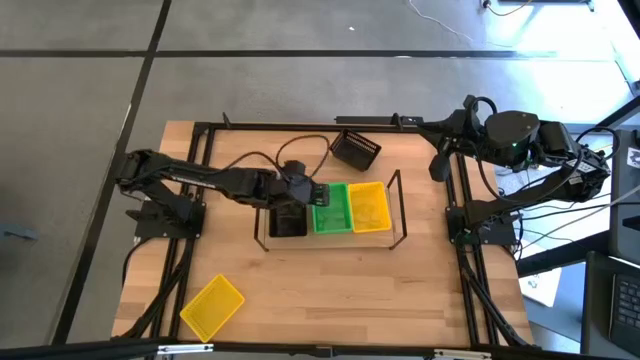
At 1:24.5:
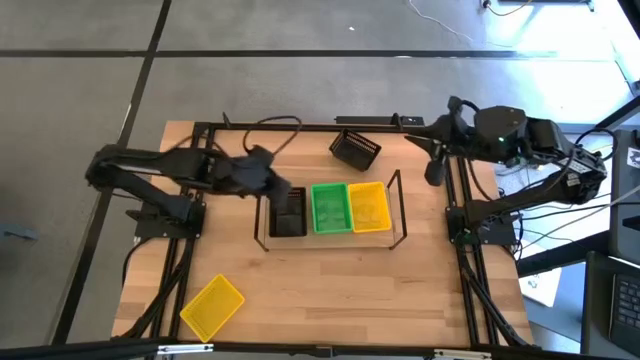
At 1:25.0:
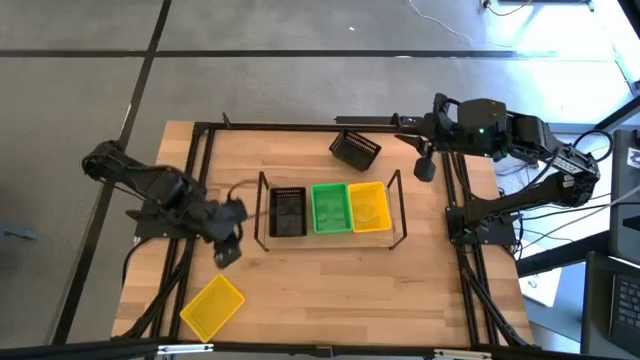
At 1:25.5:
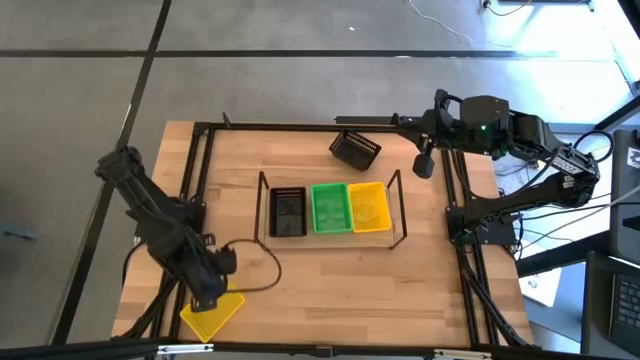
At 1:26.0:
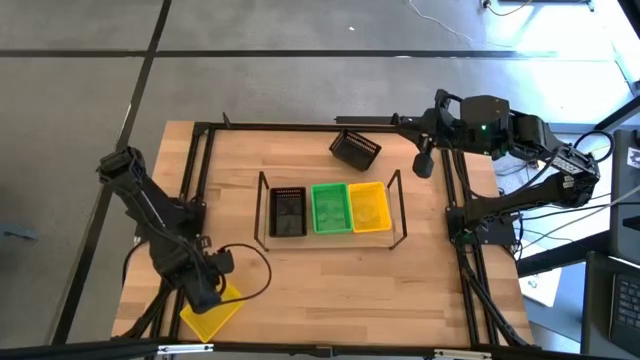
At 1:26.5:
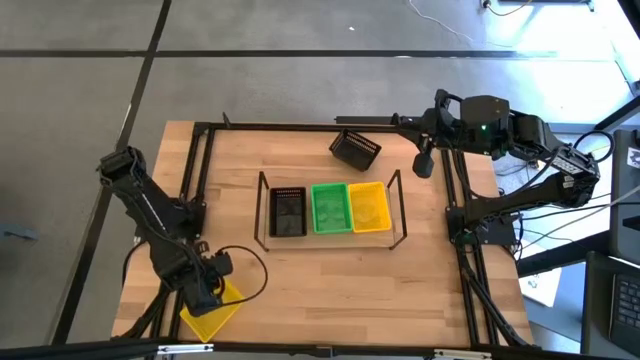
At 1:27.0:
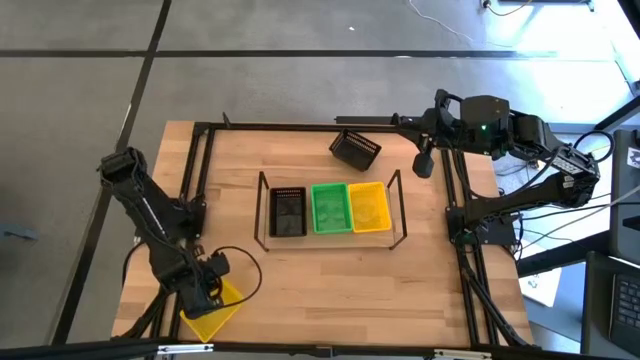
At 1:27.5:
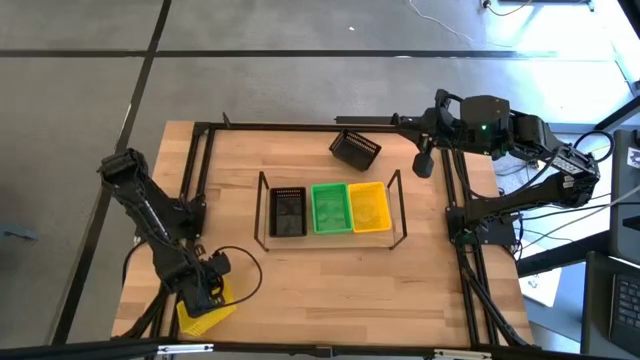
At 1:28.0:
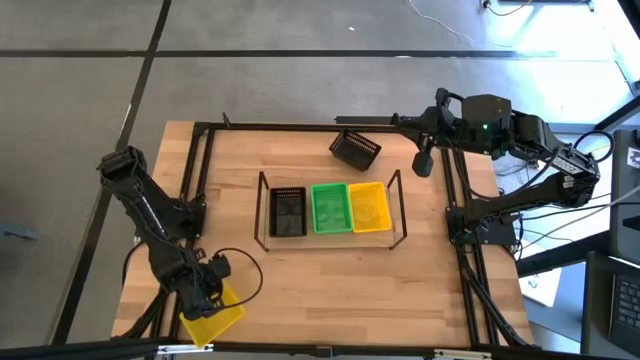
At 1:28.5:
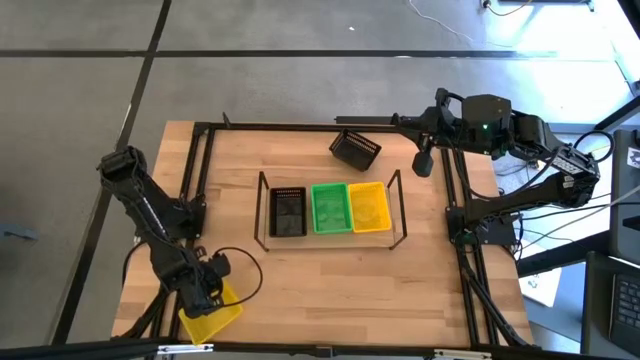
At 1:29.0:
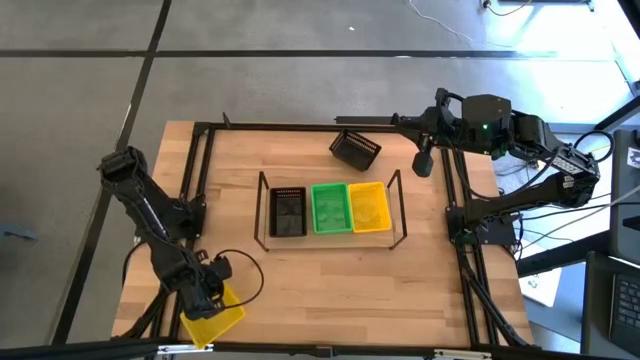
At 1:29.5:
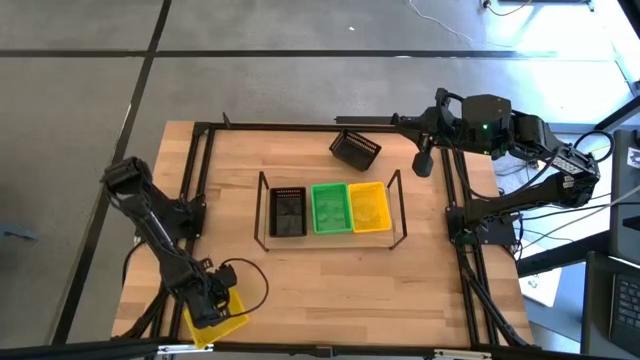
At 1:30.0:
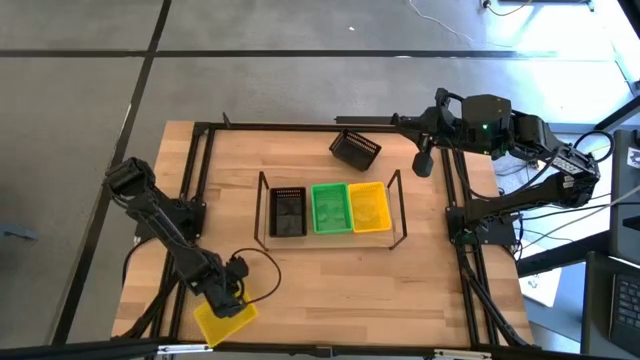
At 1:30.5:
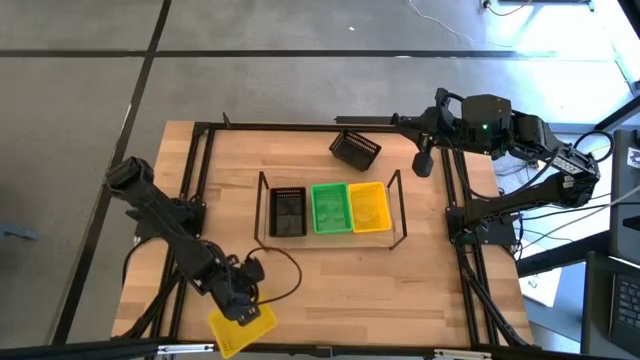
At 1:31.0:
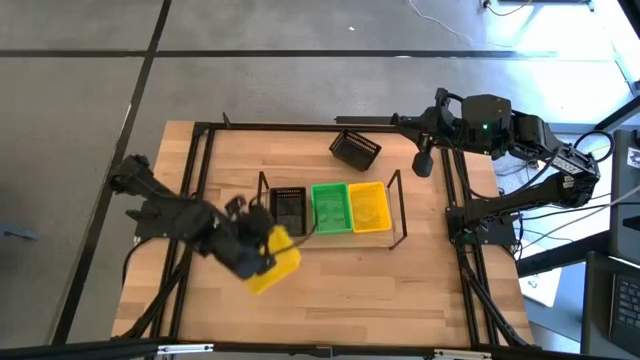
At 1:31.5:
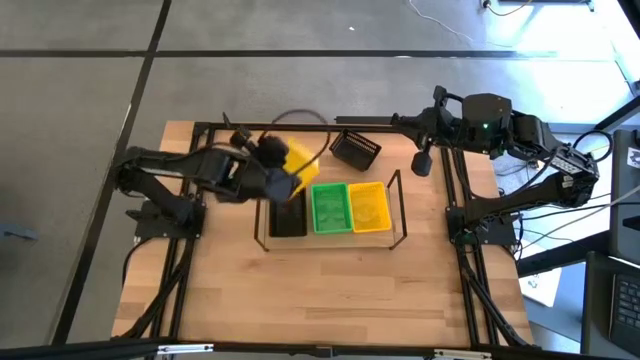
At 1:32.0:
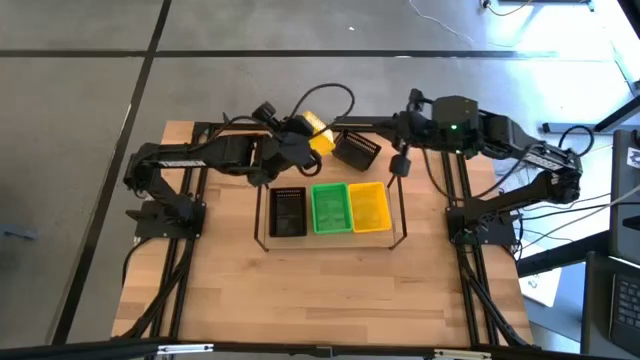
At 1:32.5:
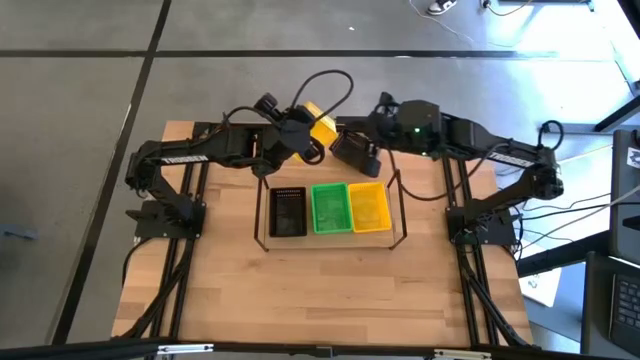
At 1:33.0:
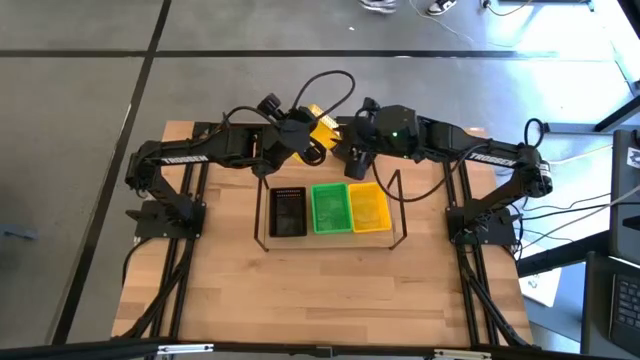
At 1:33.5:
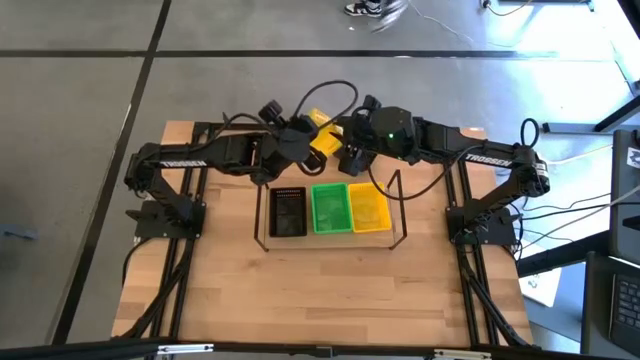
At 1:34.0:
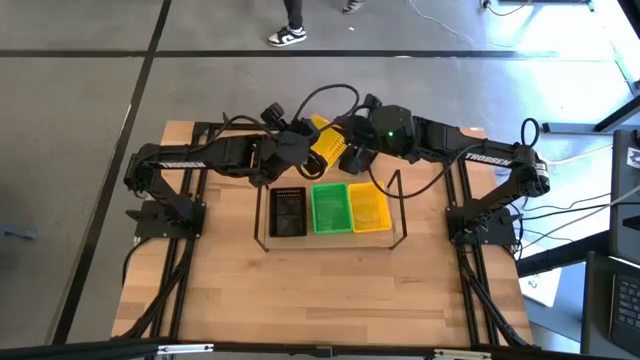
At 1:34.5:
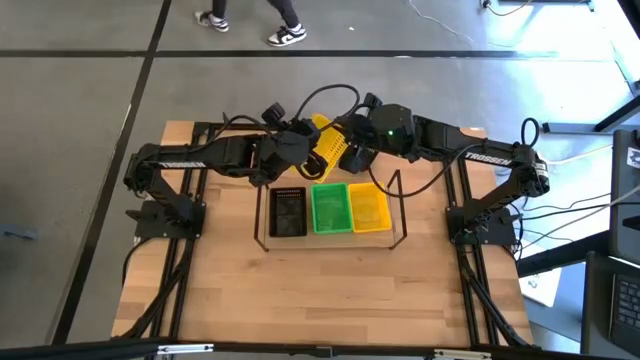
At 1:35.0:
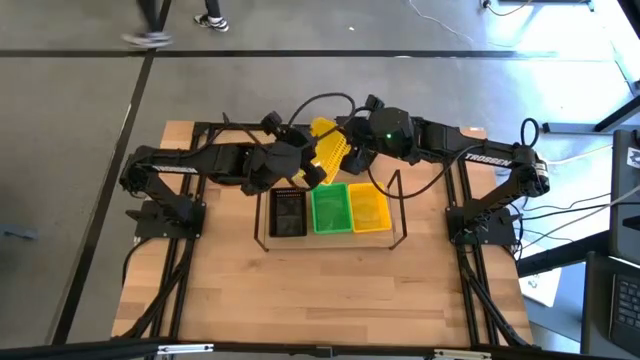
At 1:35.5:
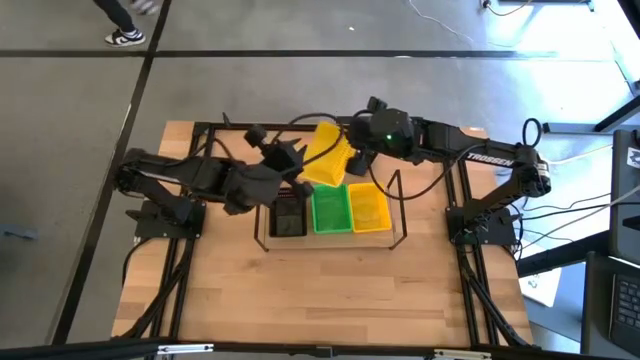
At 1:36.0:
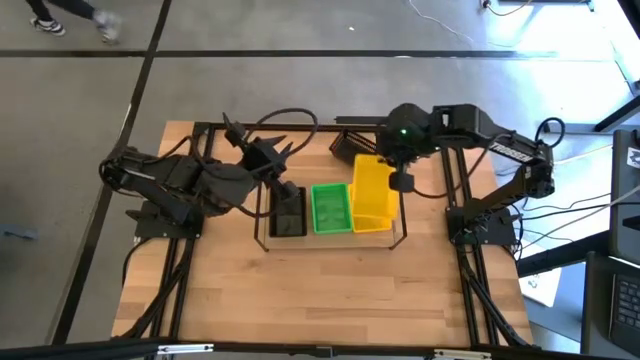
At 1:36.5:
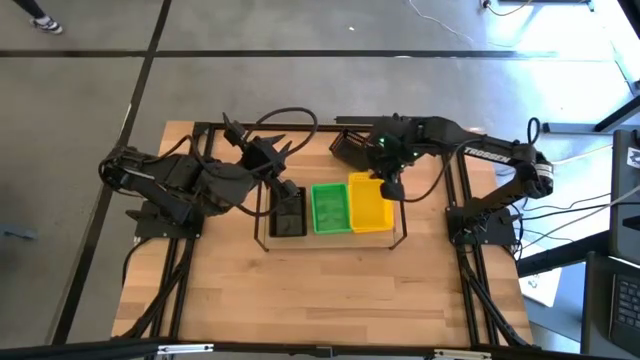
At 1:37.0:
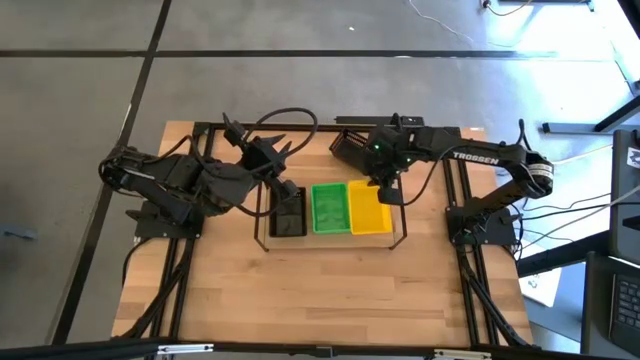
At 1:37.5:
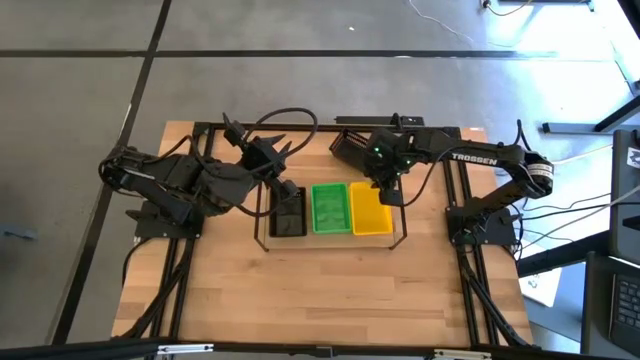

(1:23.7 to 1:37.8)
Task: Stack baskets on shelf by color
Stack the yellow bin on top of the yellow bin on the shelf

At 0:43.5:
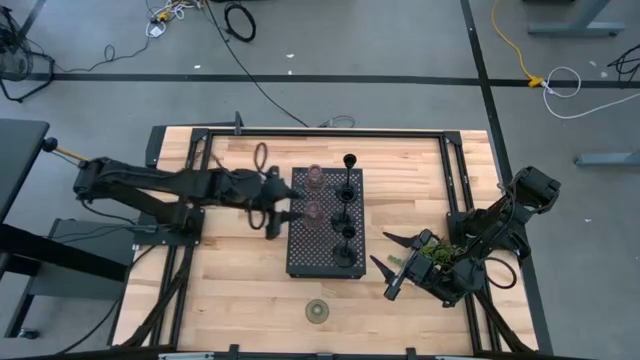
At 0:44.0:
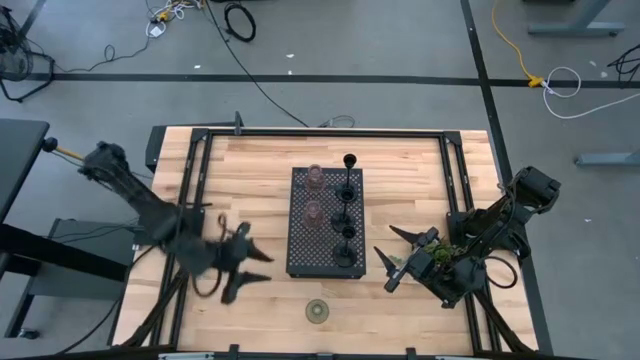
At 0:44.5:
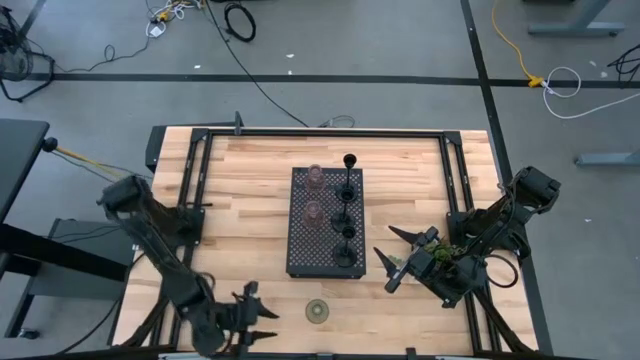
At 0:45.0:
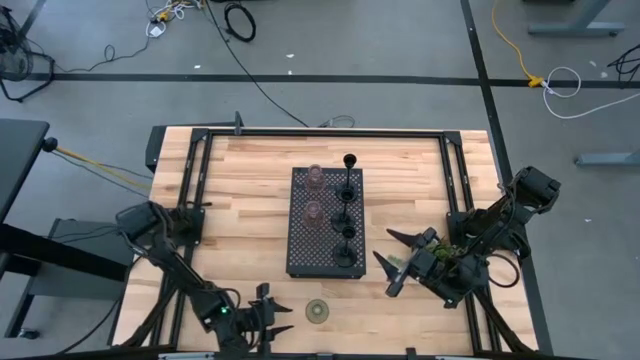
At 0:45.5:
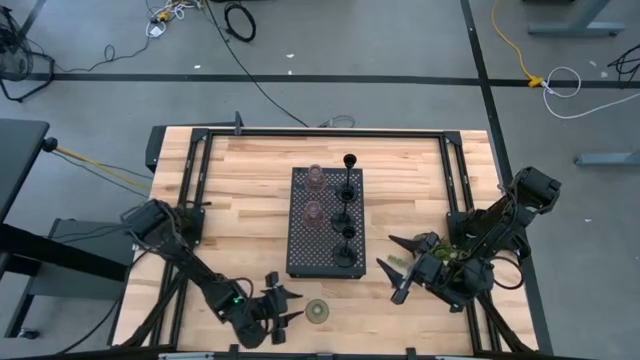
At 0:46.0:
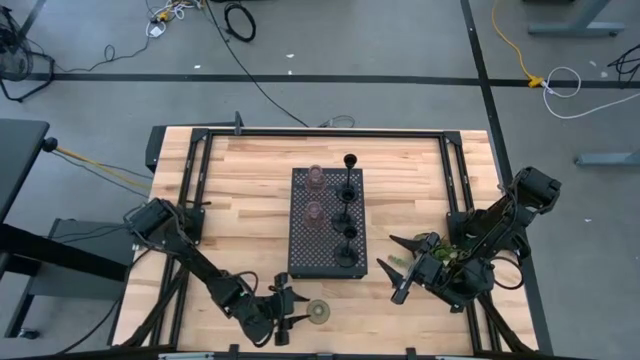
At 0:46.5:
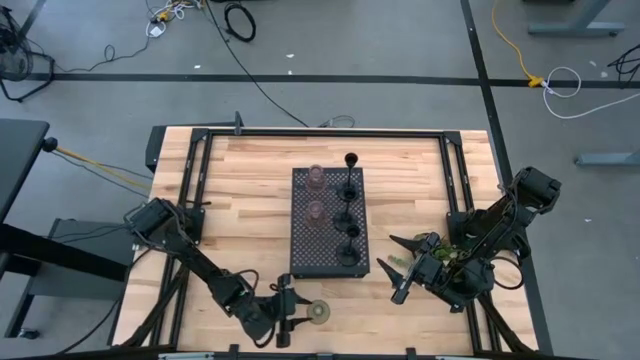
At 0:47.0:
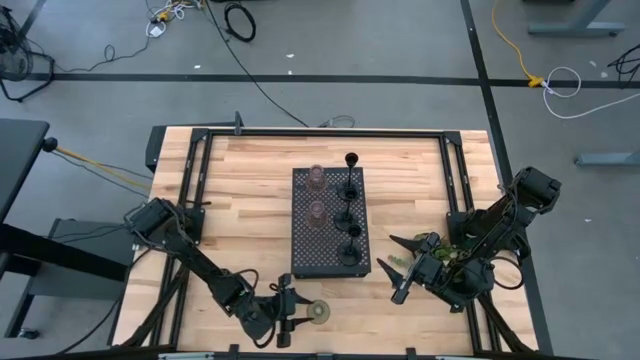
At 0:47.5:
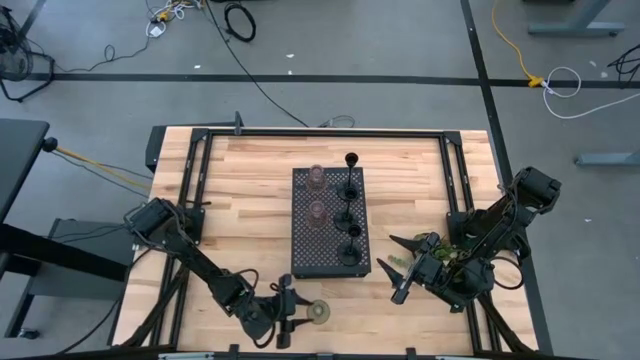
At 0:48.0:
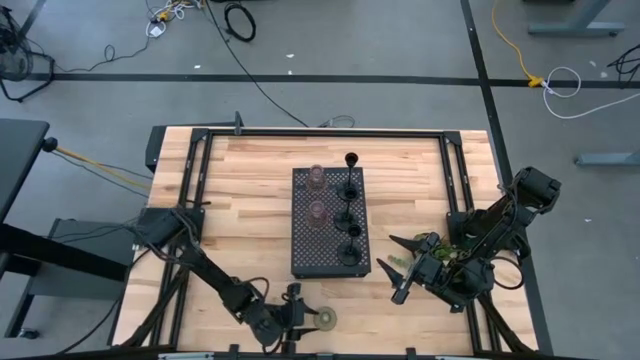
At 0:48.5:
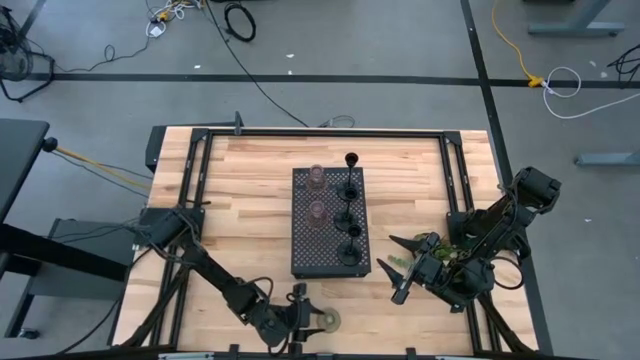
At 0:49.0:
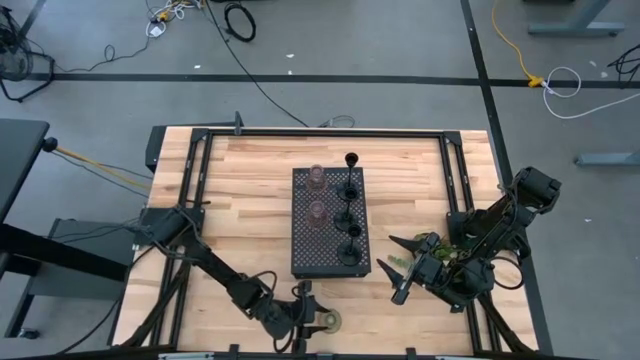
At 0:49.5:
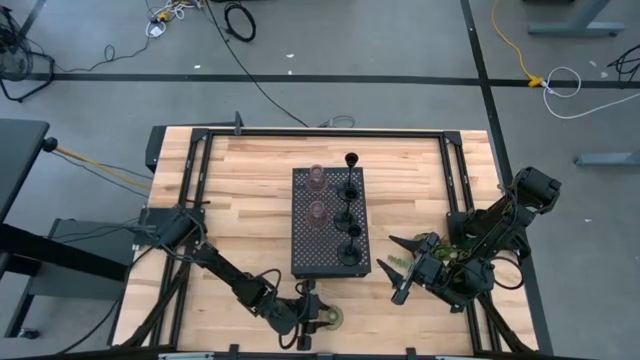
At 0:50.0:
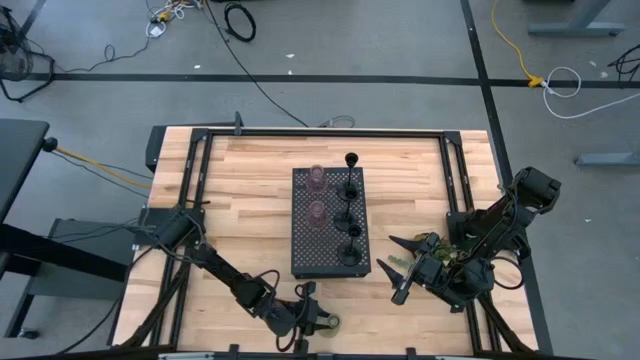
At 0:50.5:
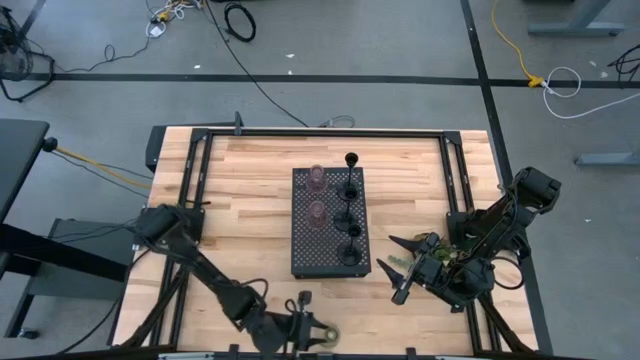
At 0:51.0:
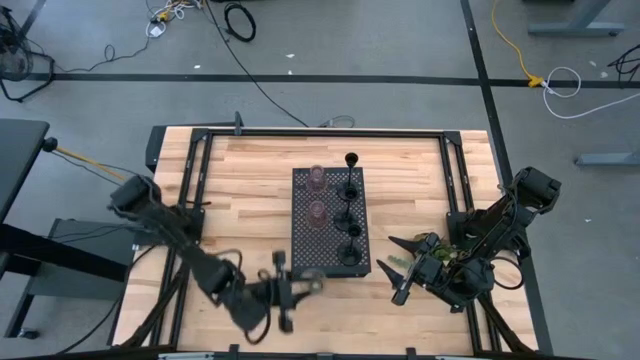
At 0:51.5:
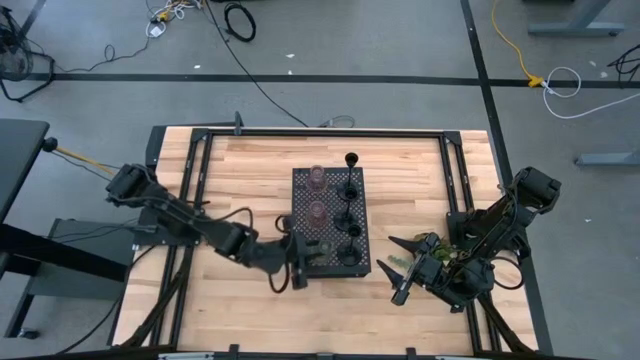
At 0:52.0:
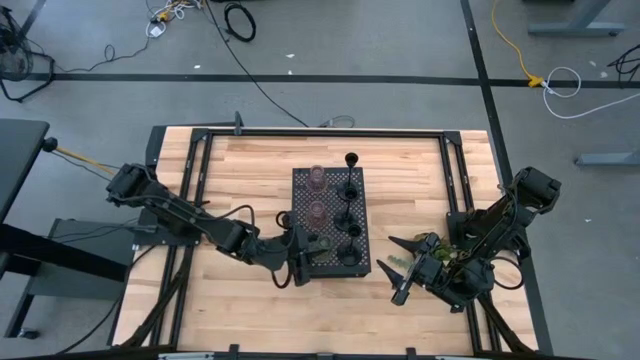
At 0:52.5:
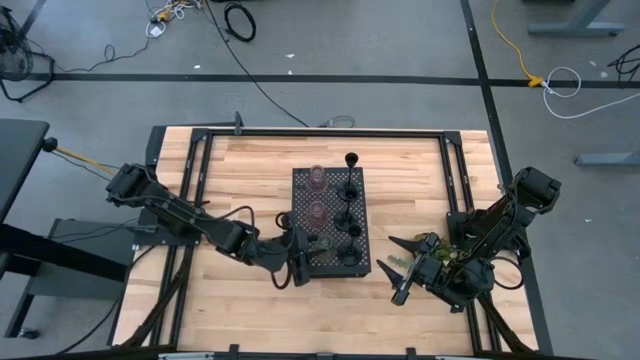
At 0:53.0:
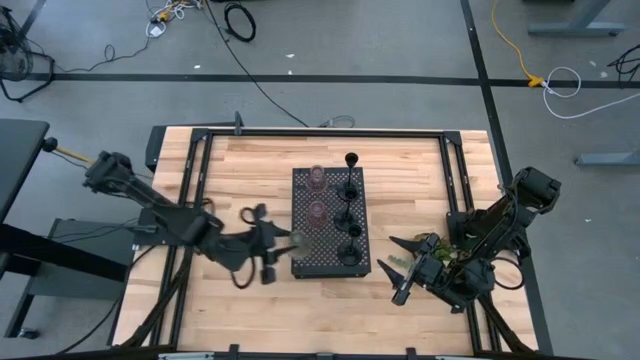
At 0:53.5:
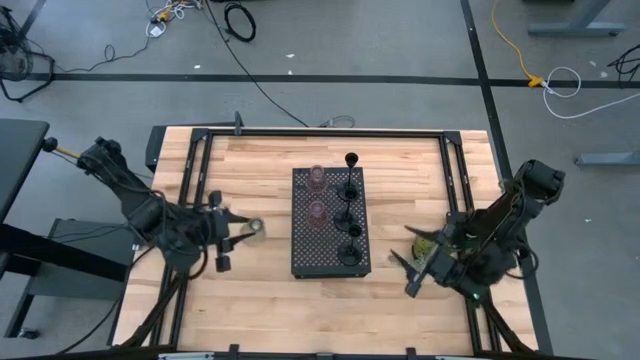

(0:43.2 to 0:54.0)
Task: Pick & Place candle stick holders
Put the green glass candle holder on the shelf
